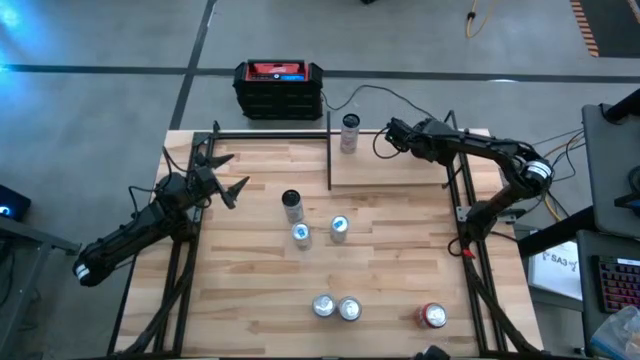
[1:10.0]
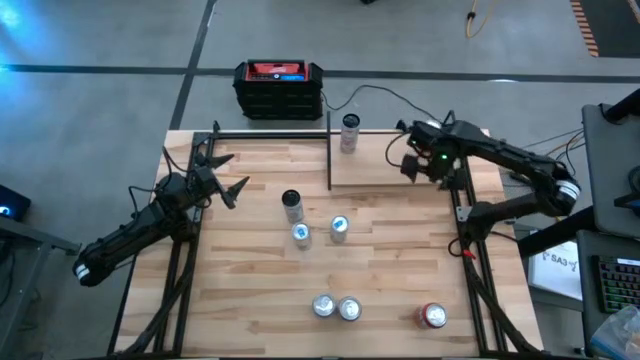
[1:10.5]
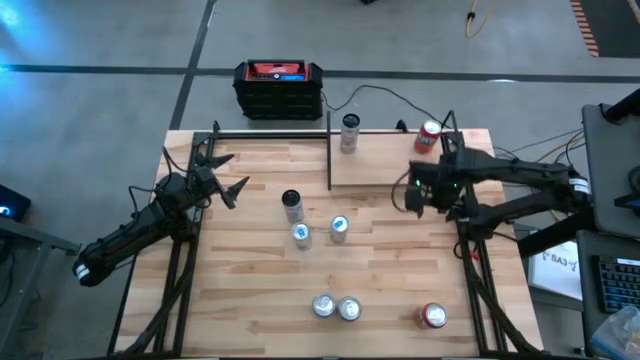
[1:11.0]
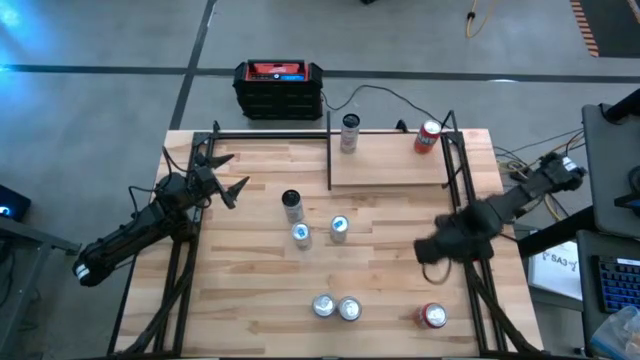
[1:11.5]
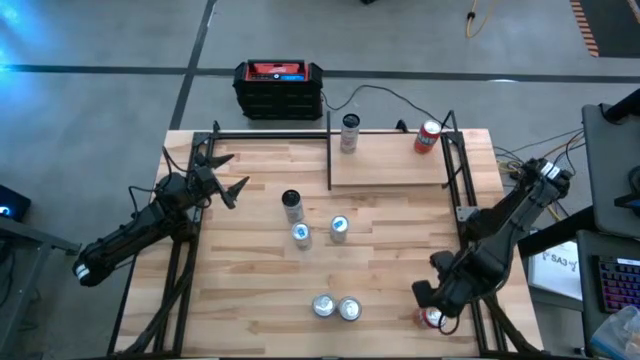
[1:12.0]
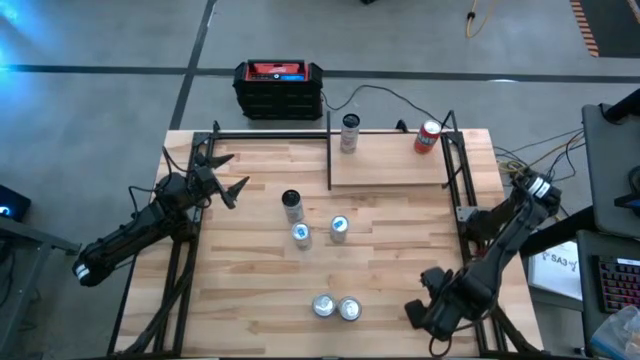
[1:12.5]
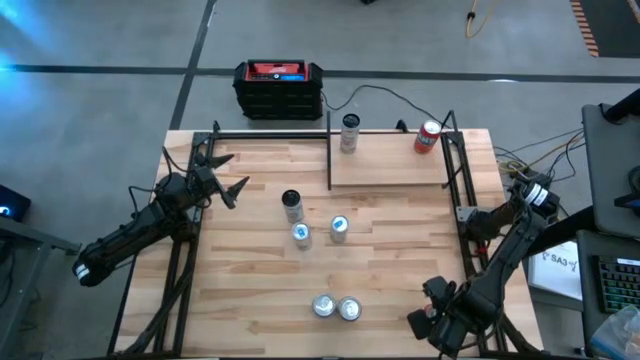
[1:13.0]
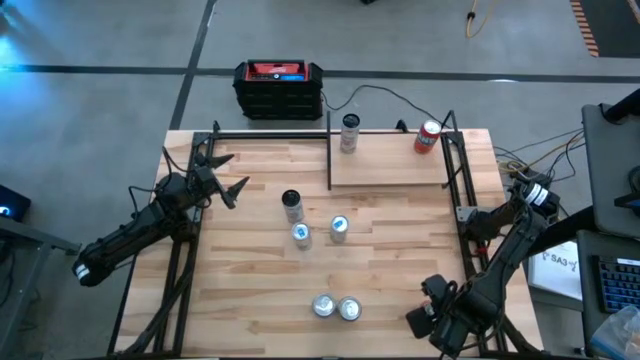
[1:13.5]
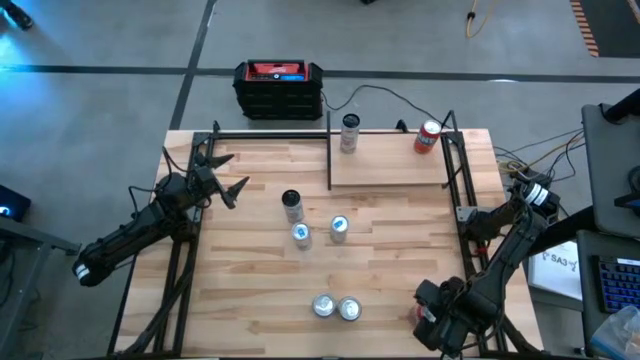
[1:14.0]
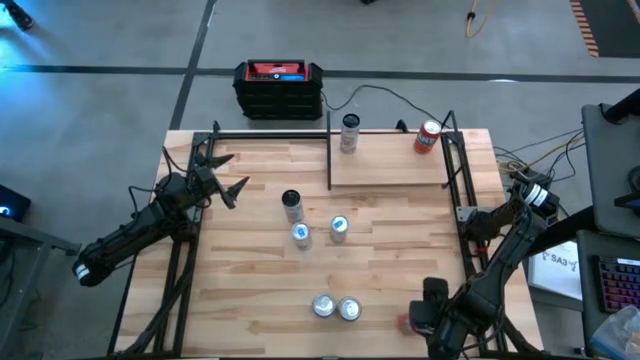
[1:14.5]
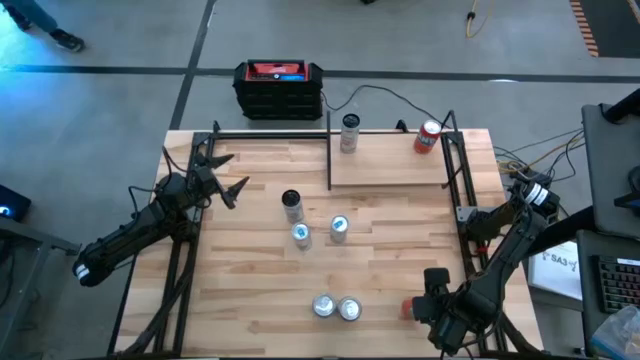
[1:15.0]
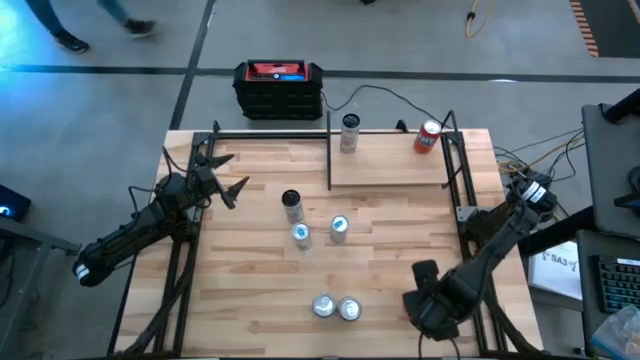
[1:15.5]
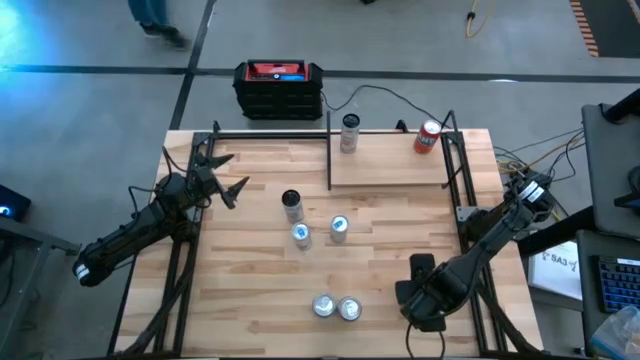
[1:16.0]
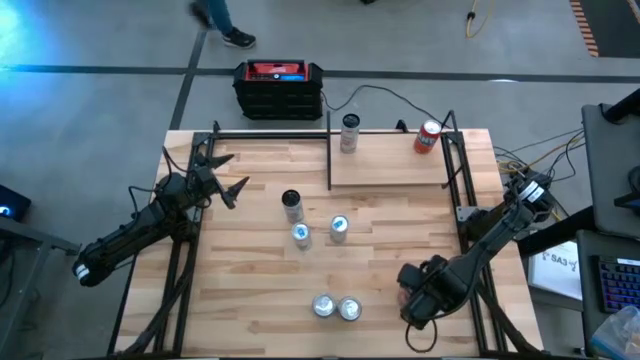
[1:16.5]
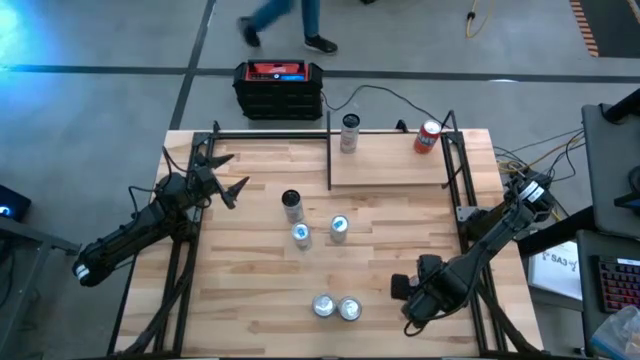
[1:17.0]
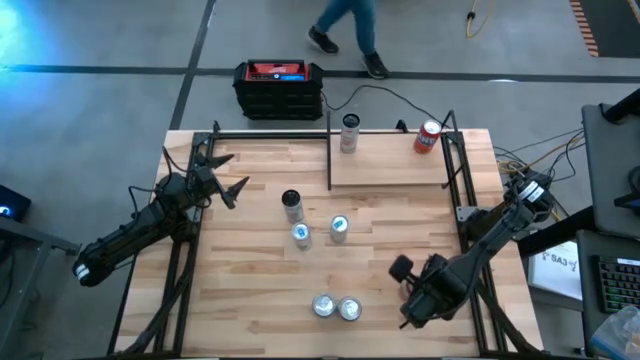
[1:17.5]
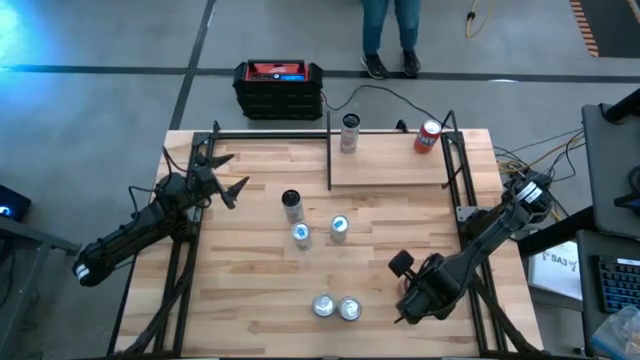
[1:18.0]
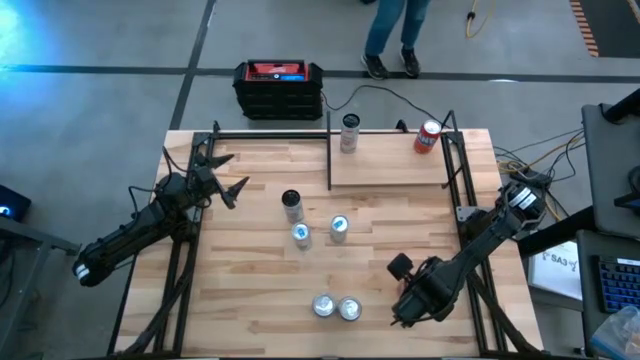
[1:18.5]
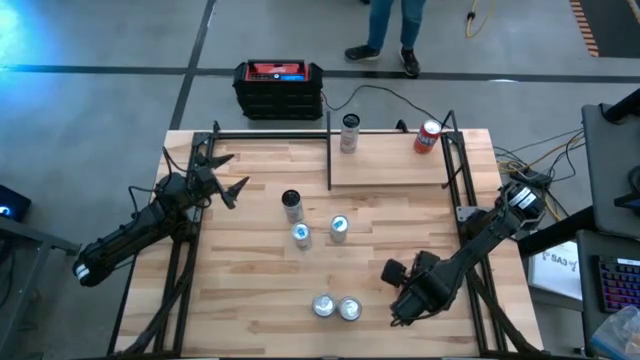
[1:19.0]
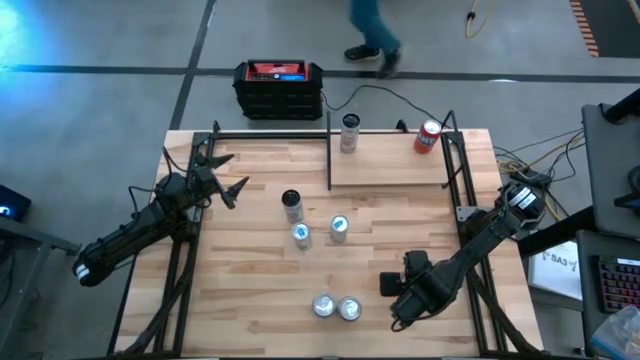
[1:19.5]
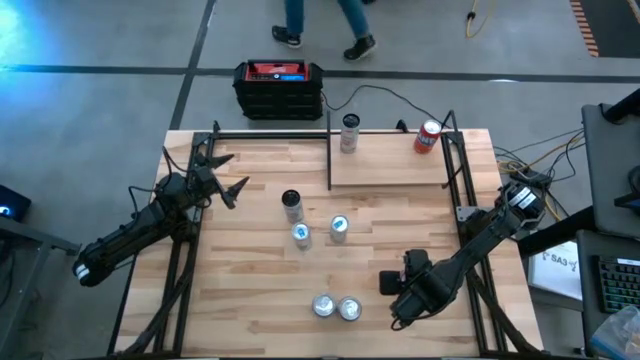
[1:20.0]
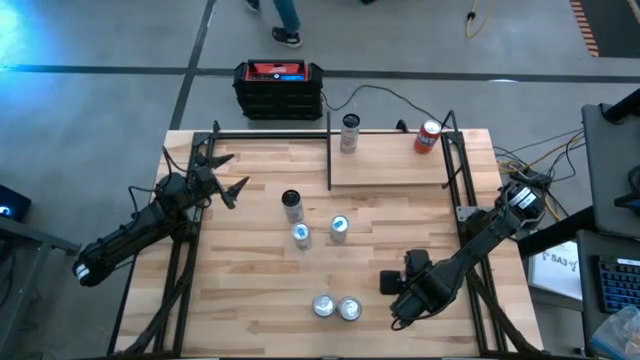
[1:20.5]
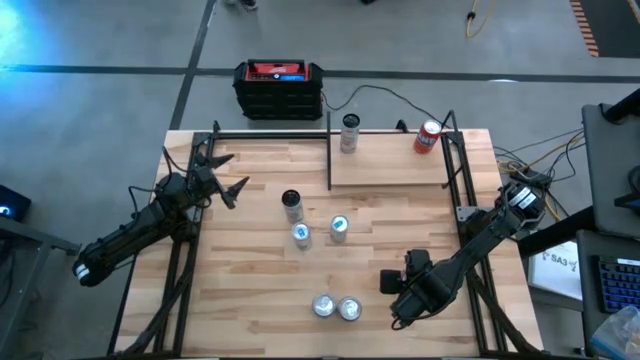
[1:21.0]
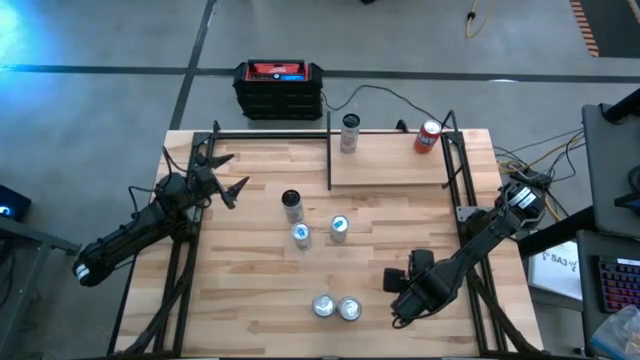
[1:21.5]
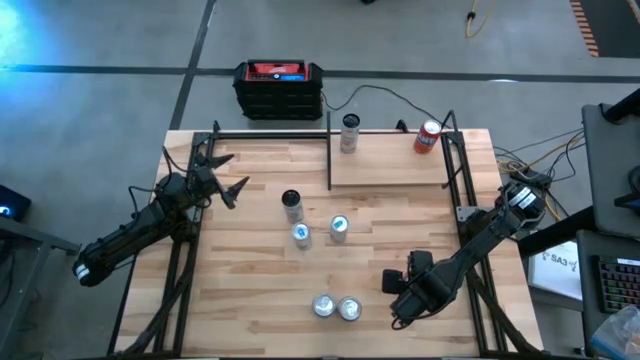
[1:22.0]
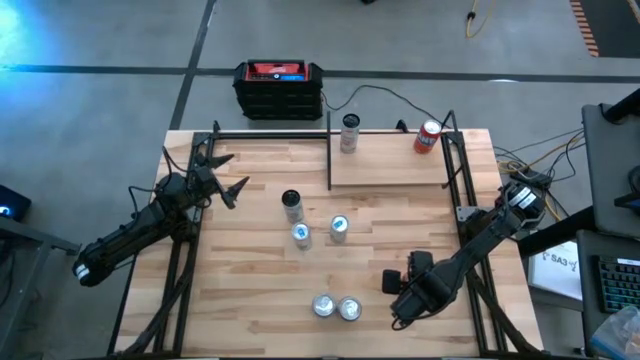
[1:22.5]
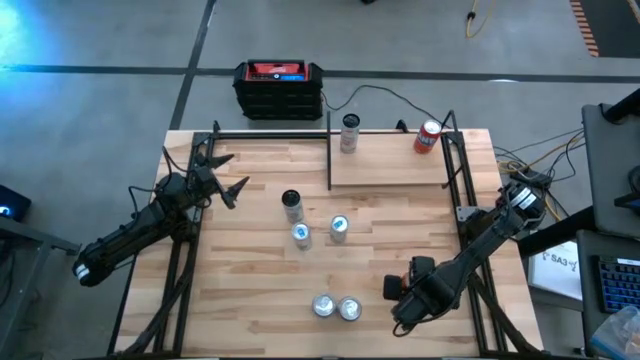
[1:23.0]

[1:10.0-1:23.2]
Task: Place canned beverage on shelf
Put the red soda can on the shelf aligned with the other red soda can

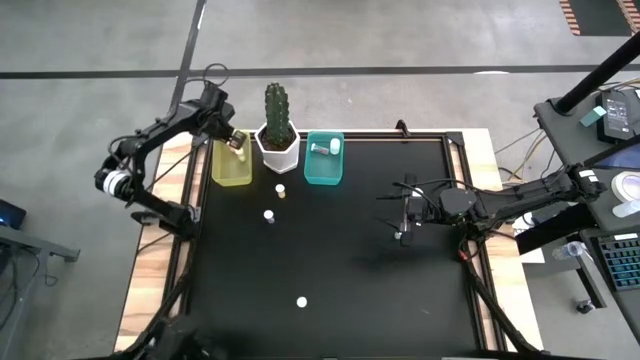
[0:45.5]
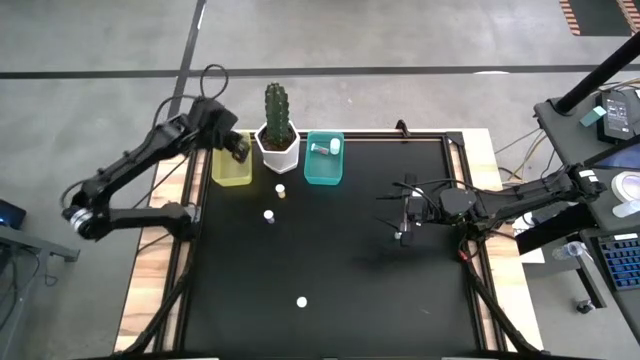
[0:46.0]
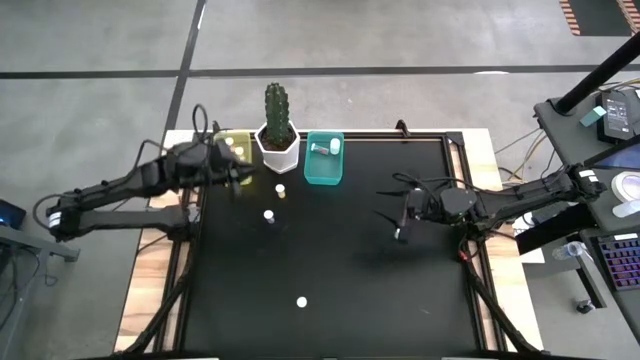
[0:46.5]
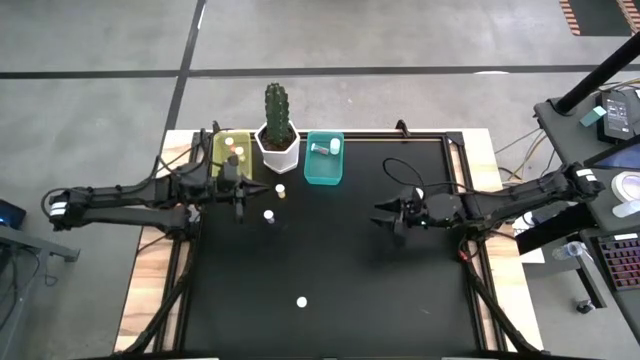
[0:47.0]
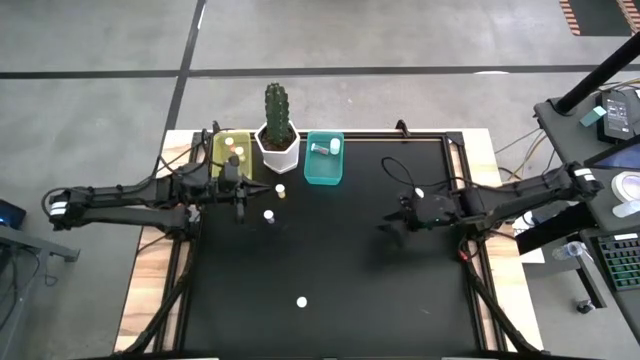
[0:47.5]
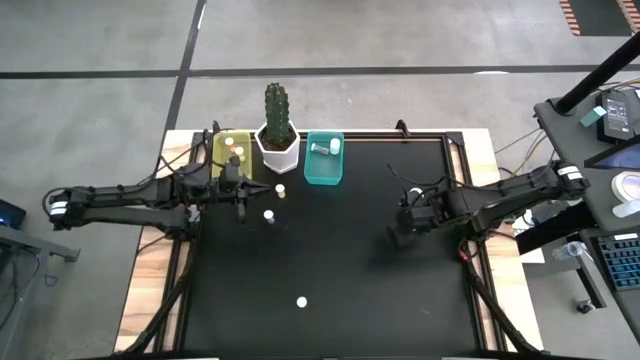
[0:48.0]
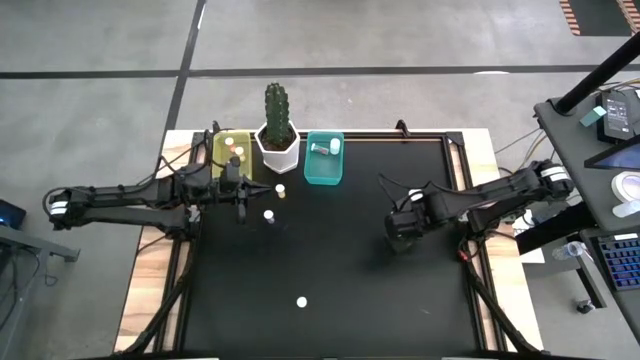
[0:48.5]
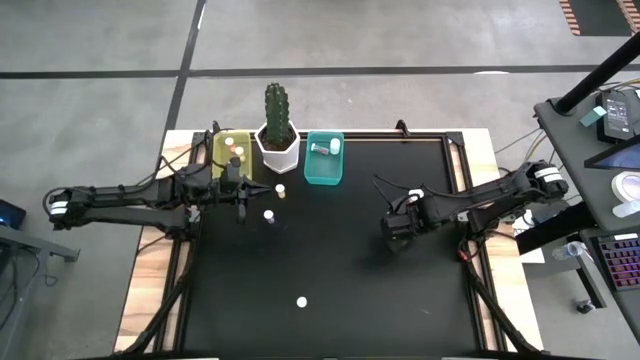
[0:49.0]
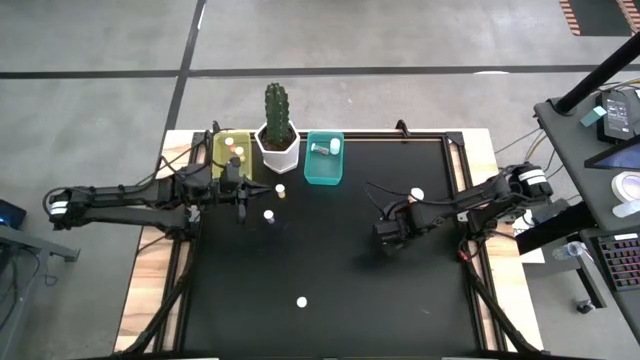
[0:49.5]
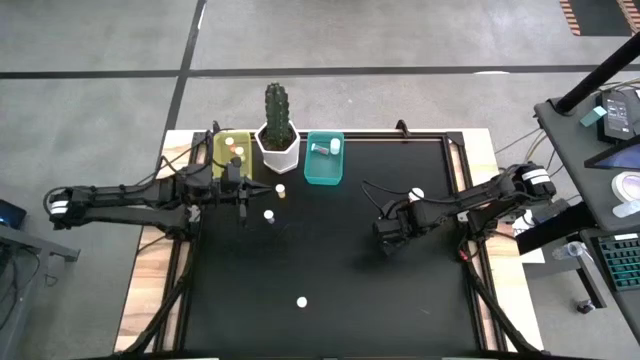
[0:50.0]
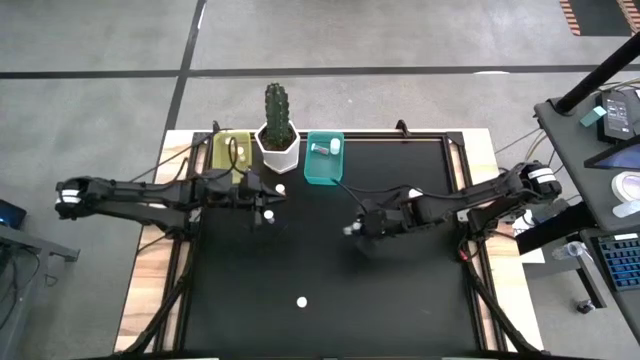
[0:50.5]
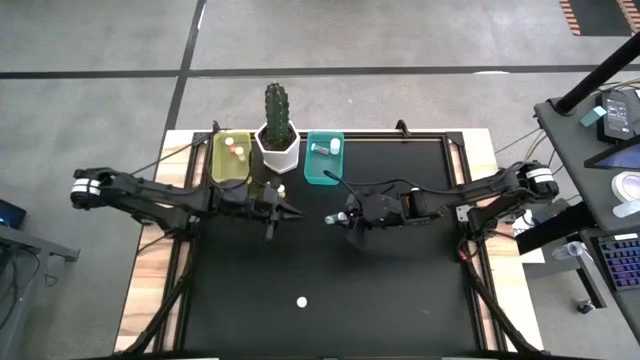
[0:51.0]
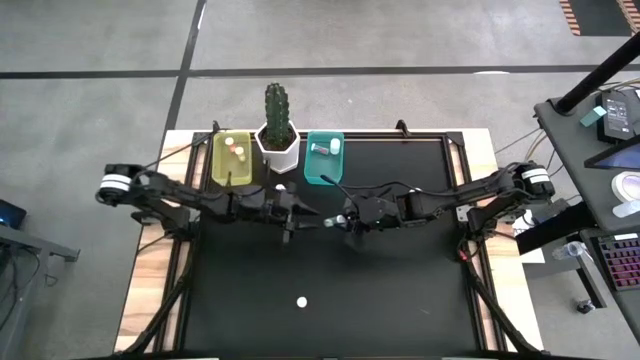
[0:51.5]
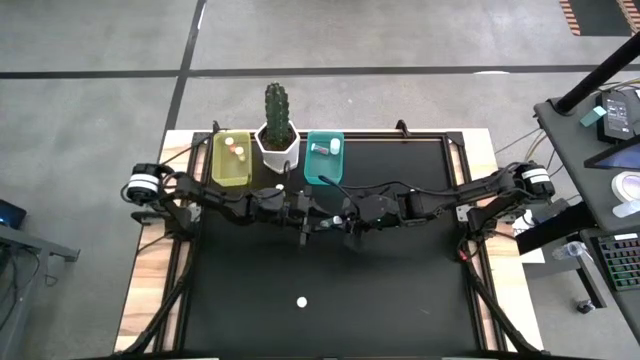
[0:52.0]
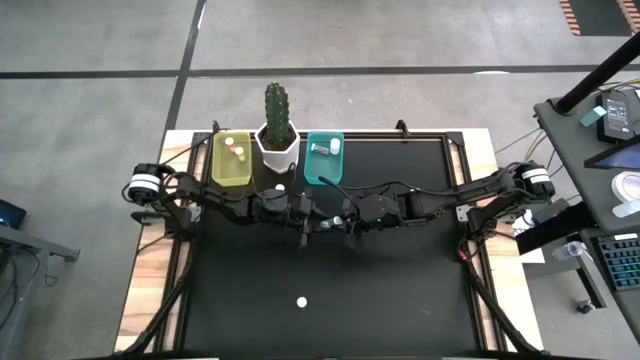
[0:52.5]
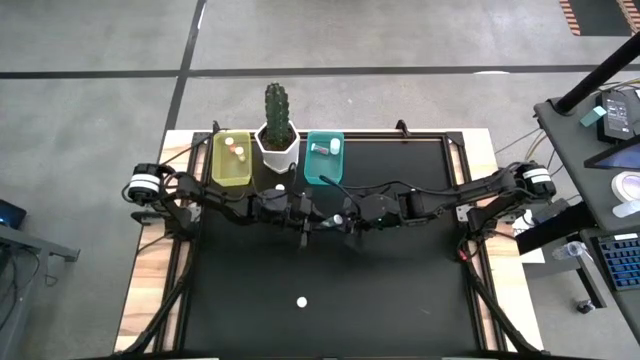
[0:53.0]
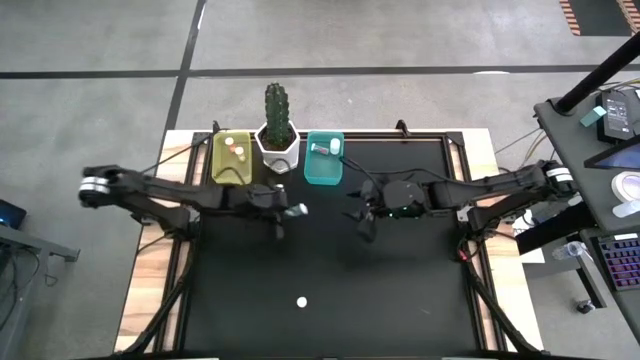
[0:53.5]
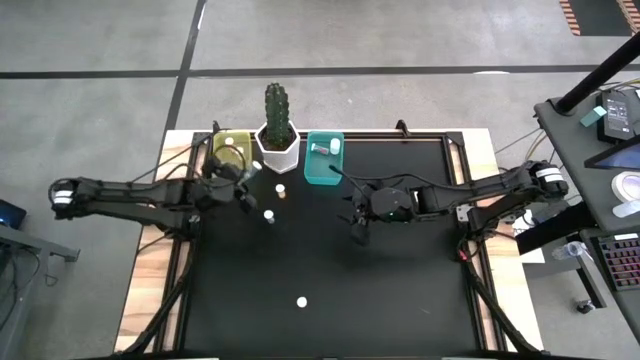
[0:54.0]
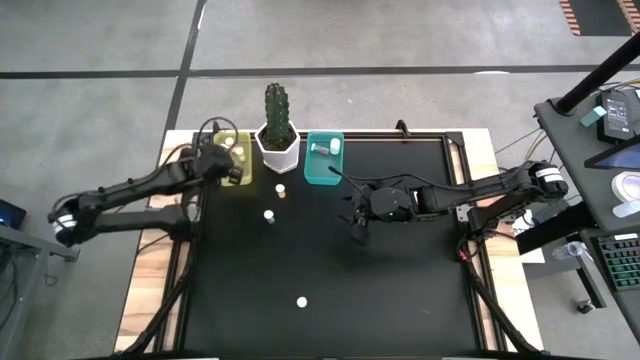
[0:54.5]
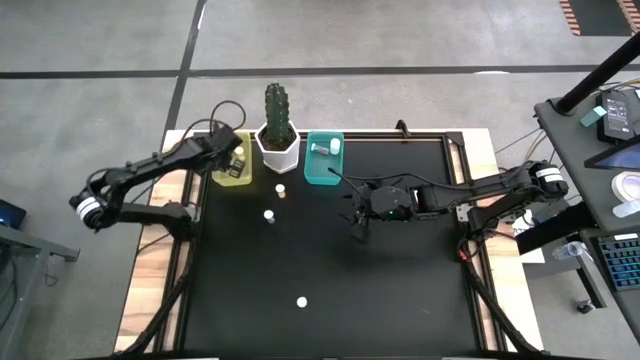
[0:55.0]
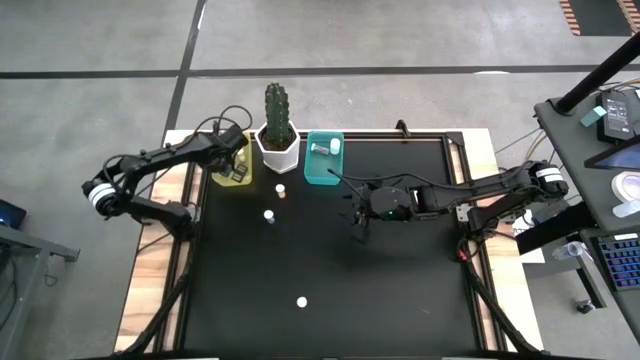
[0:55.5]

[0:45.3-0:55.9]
Task: Pick and place medicine bottles into bin by pill shape (circle, oval)
Put the light blue tablet bottle into the yellow bin
